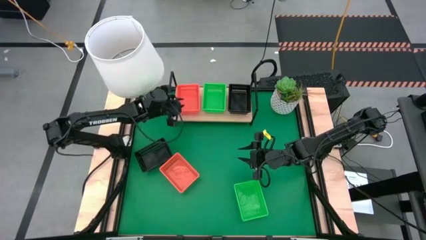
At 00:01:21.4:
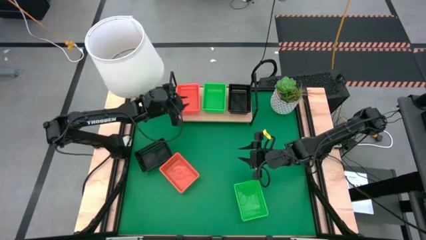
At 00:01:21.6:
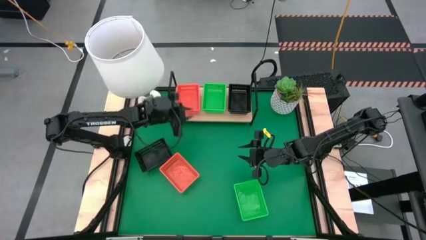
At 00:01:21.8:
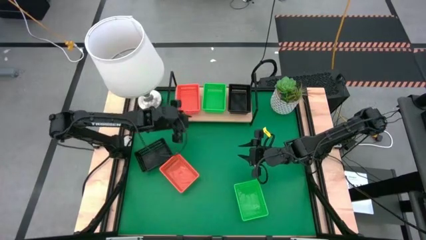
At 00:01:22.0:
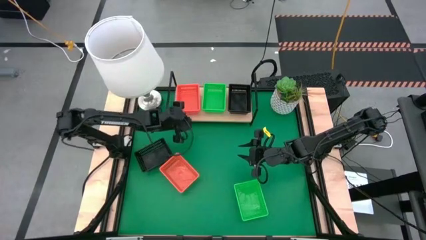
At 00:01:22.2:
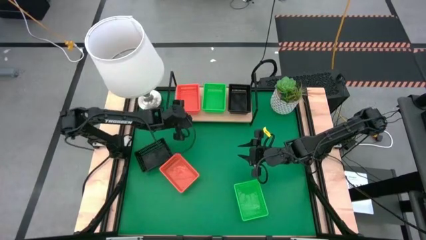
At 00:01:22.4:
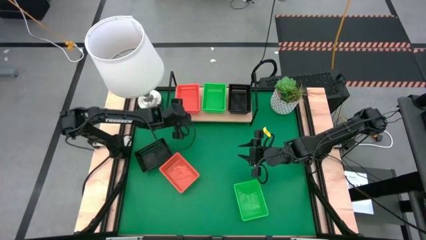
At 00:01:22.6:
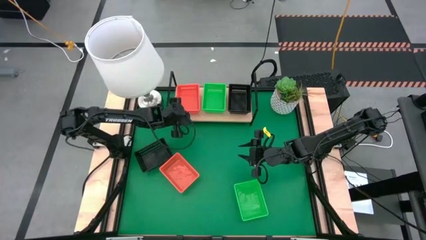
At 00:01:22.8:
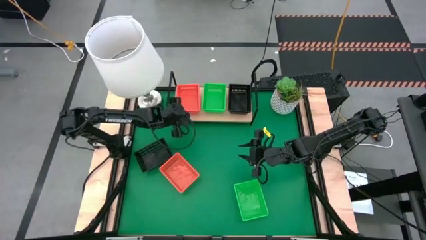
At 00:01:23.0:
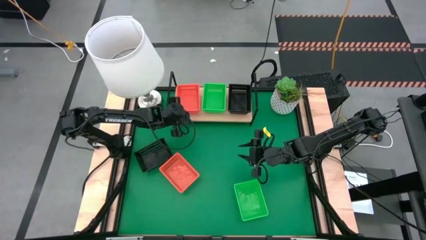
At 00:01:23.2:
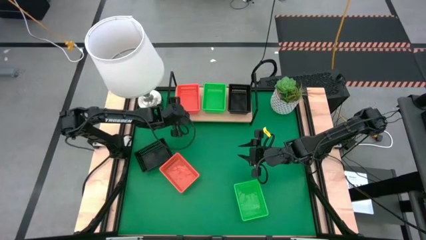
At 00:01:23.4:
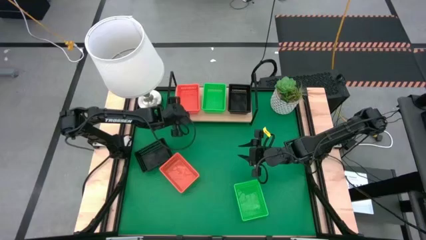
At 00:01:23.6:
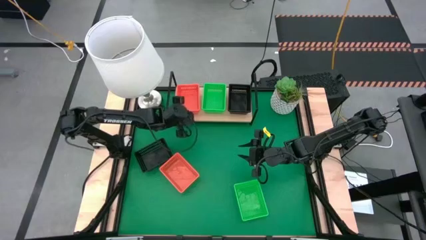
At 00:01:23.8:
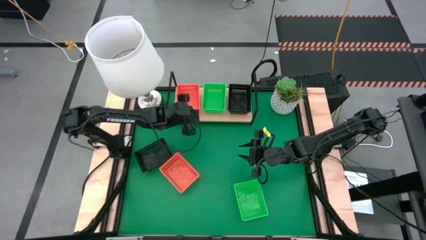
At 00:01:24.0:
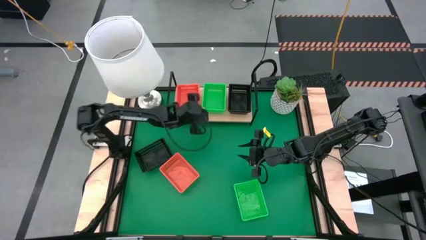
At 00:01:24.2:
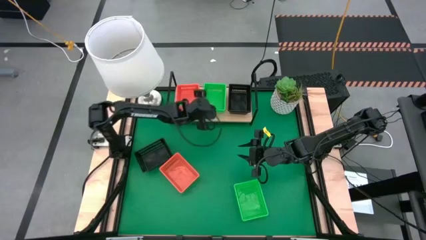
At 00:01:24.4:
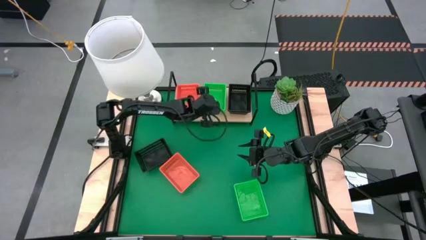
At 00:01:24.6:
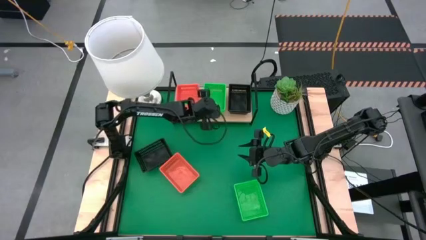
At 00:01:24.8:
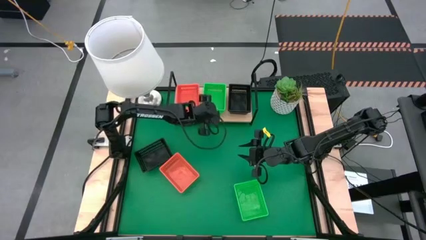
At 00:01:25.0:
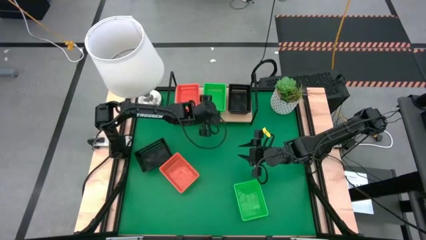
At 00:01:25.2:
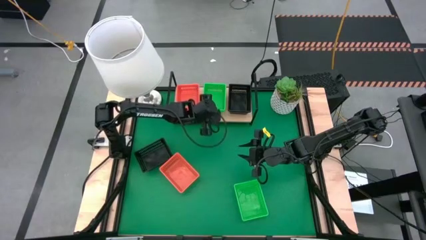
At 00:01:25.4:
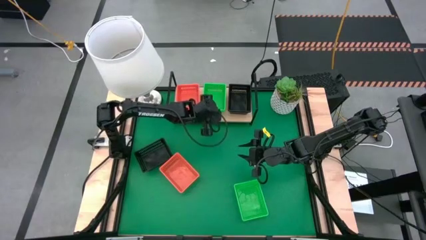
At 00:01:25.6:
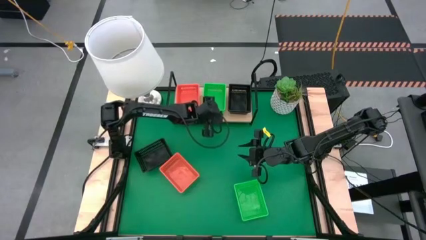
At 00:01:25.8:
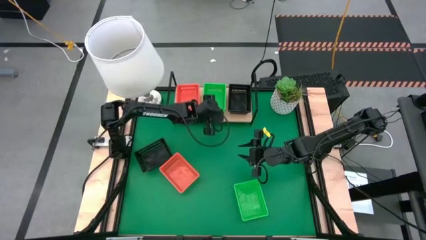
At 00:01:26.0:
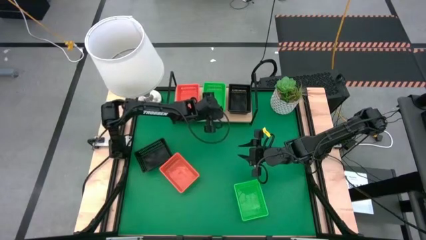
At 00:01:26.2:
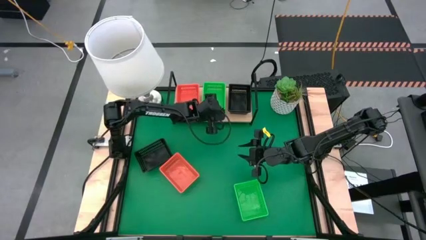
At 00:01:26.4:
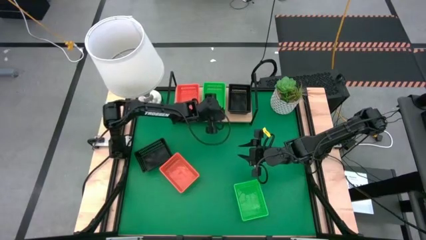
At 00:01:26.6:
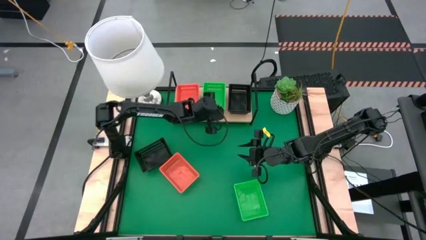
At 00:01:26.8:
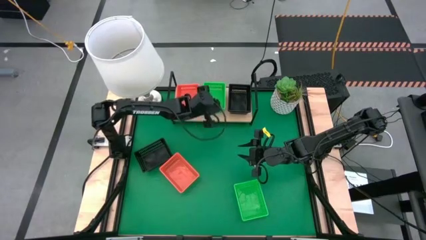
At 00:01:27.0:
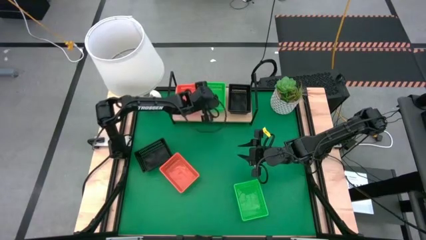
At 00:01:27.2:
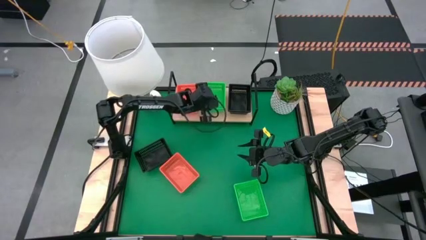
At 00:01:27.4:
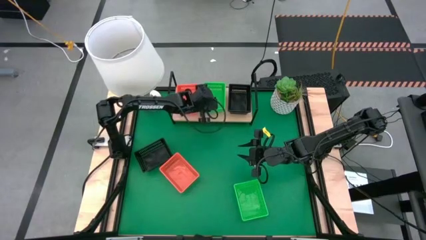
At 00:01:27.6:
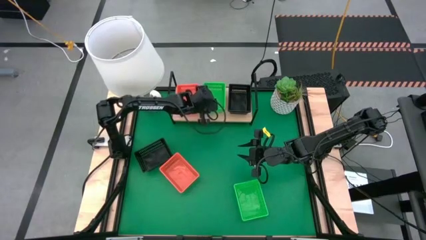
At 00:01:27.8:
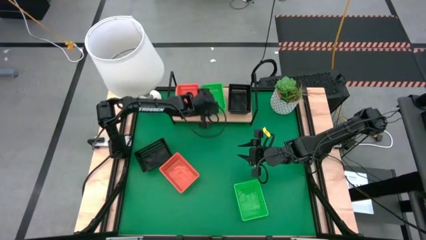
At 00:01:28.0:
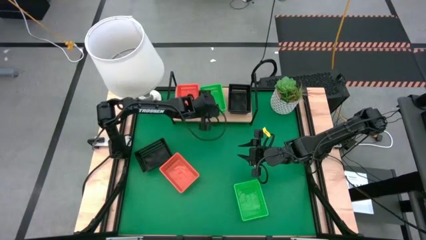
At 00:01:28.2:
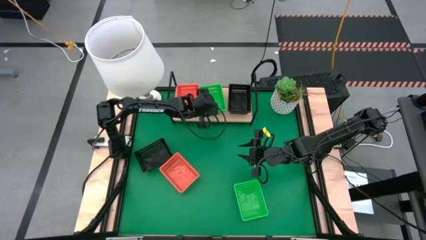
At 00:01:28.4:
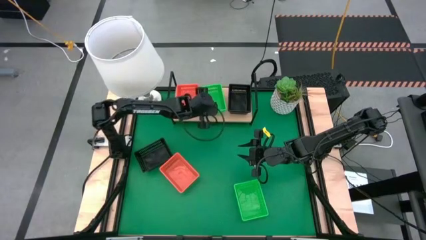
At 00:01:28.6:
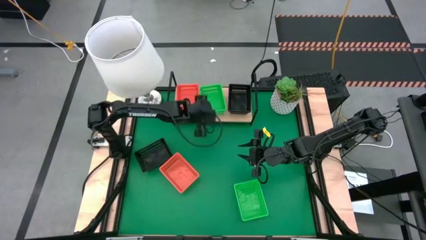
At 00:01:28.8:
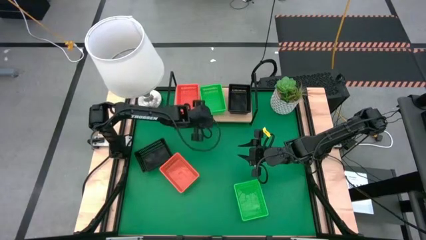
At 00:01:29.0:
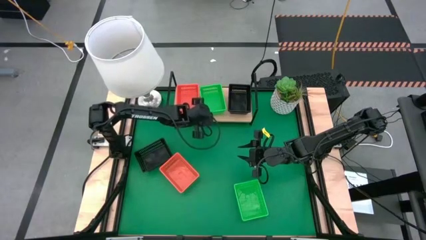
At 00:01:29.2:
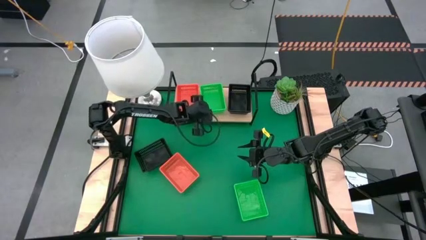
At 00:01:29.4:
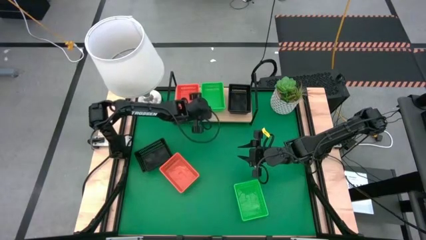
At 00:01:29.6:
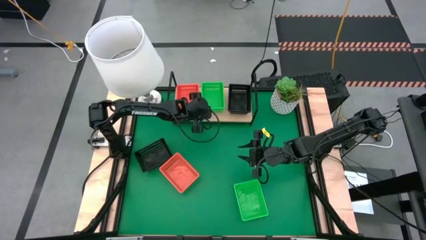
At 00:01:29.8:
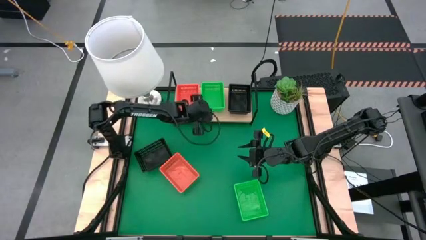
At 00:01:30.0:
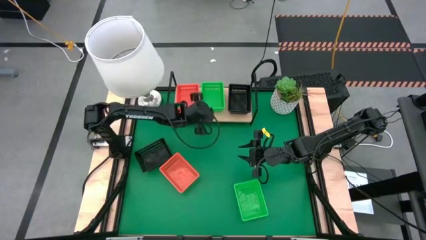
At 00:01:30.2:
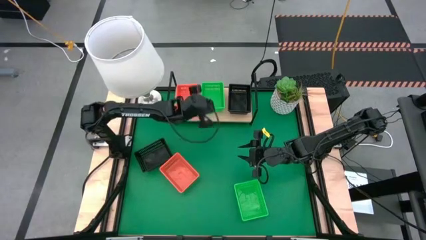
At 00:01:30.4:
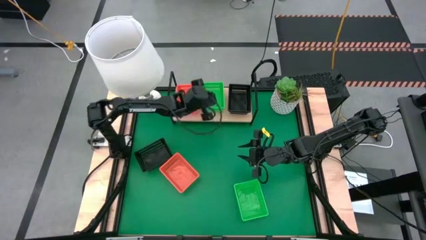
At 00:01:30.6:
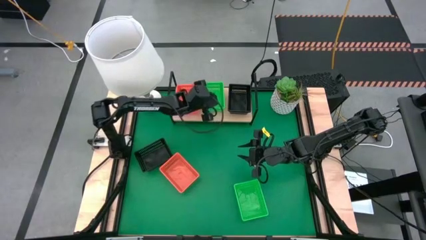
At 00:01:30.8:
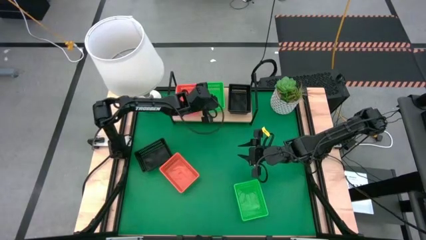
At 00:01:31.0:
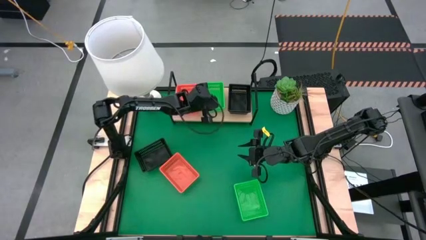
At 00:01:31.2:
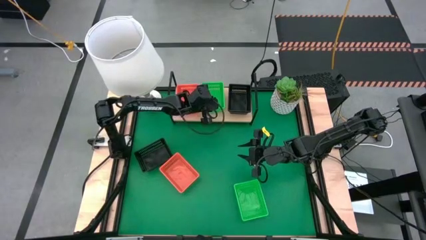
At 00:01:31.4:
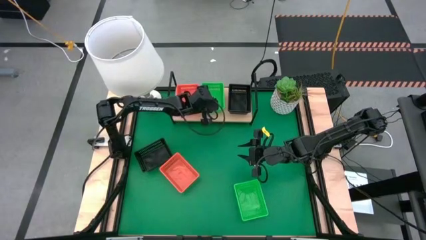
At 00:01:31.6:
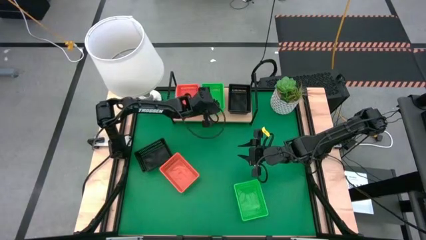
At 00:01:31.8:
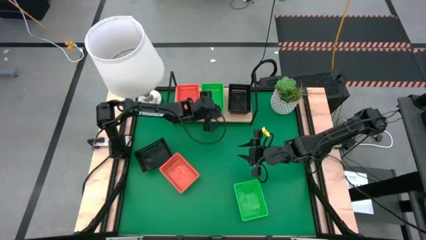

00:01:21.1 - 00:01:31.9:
Task: Stack baskets on shelf by color
Adjust the green bin on the shelf
